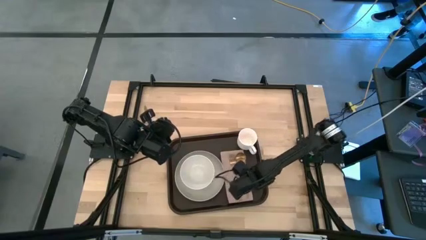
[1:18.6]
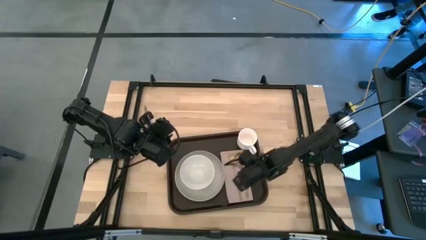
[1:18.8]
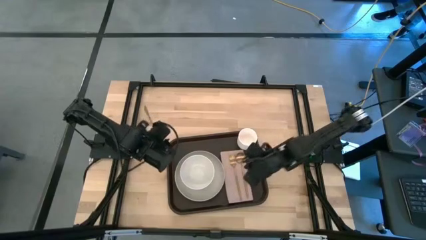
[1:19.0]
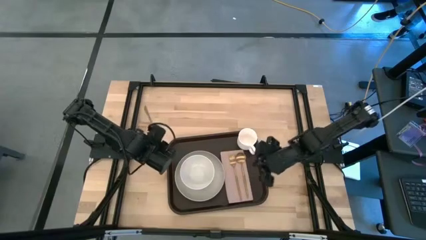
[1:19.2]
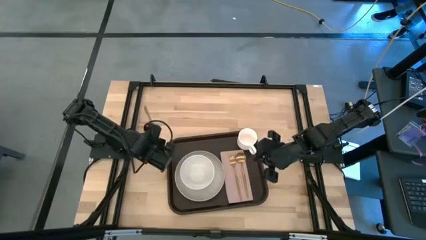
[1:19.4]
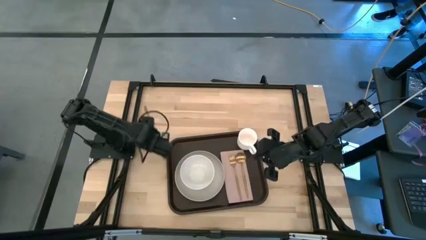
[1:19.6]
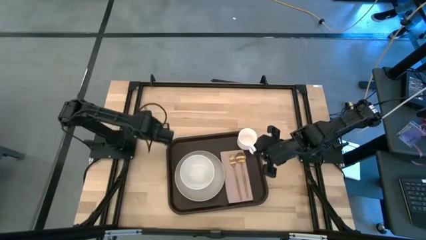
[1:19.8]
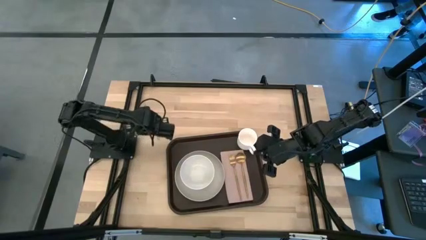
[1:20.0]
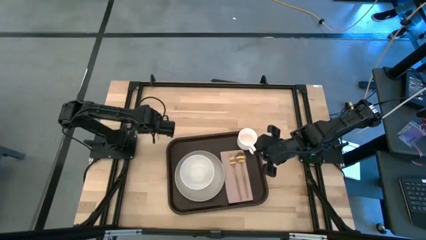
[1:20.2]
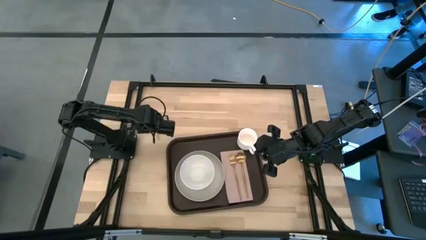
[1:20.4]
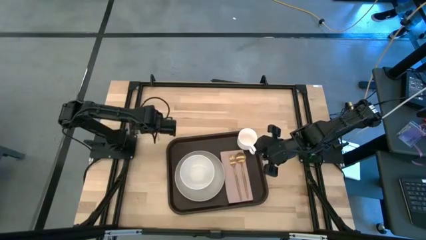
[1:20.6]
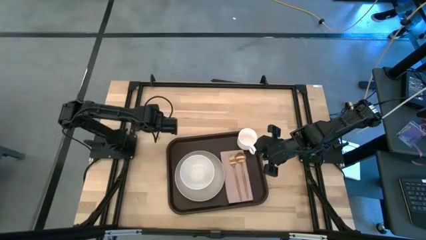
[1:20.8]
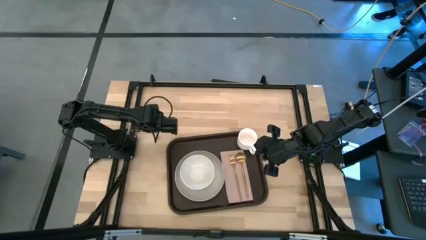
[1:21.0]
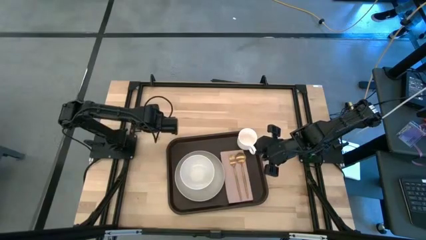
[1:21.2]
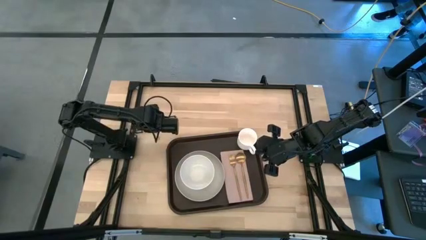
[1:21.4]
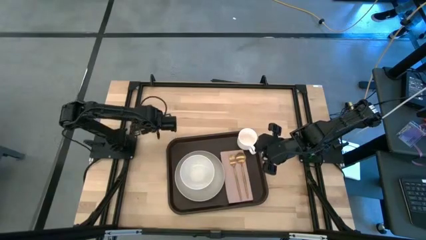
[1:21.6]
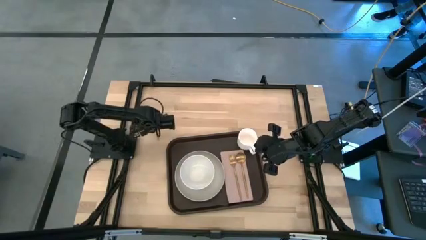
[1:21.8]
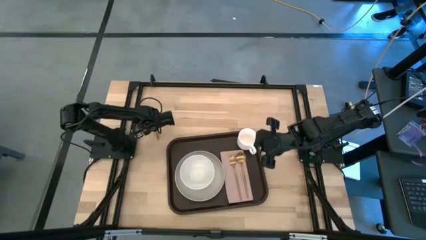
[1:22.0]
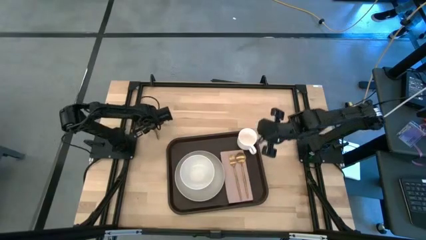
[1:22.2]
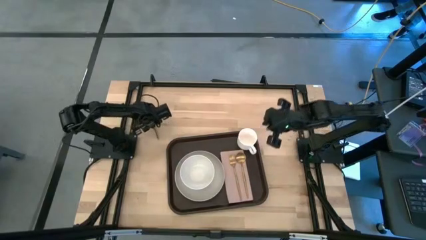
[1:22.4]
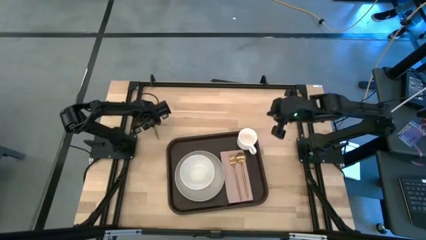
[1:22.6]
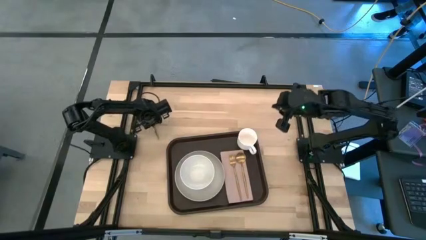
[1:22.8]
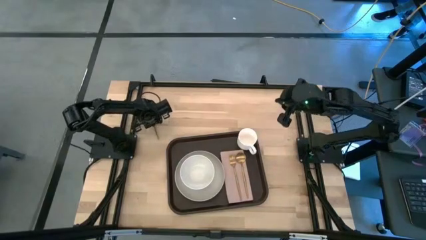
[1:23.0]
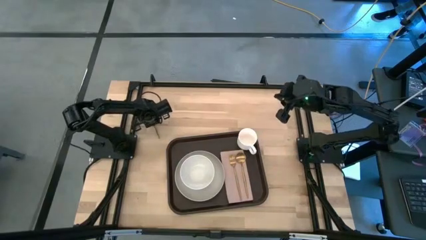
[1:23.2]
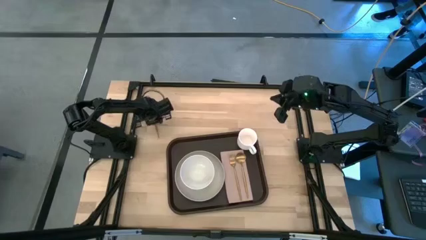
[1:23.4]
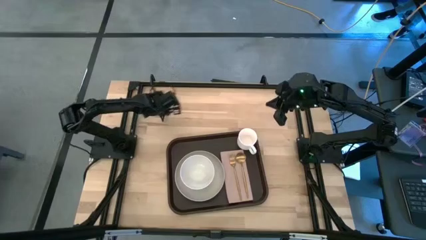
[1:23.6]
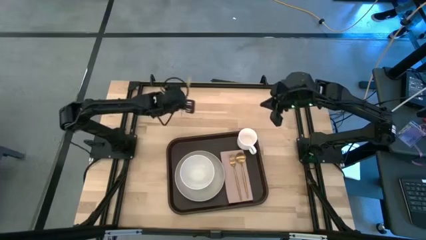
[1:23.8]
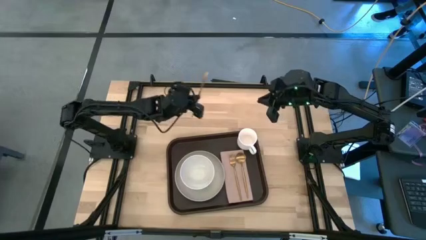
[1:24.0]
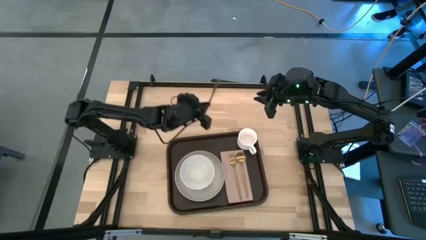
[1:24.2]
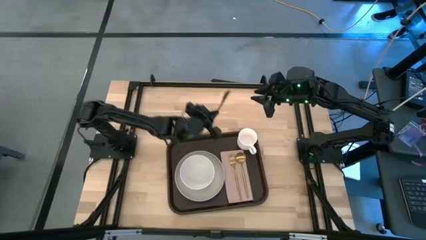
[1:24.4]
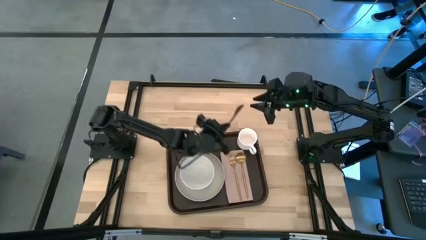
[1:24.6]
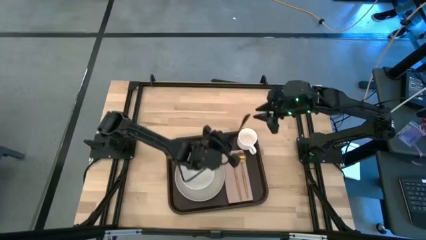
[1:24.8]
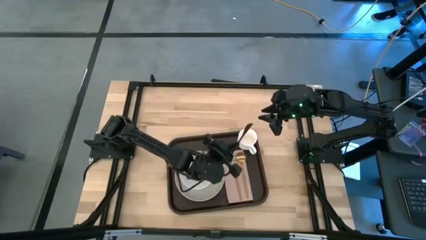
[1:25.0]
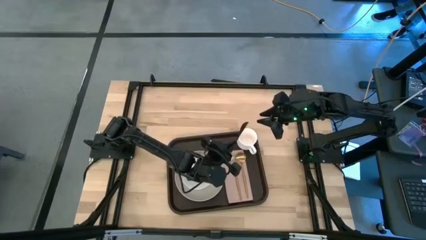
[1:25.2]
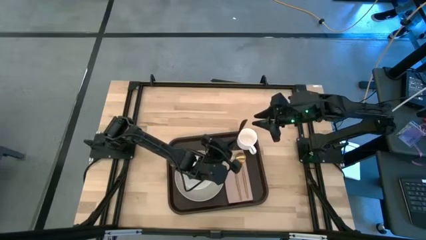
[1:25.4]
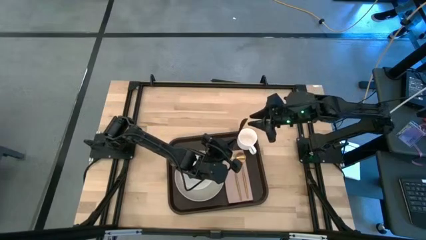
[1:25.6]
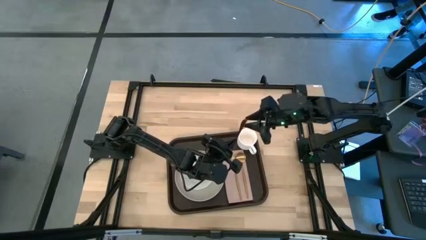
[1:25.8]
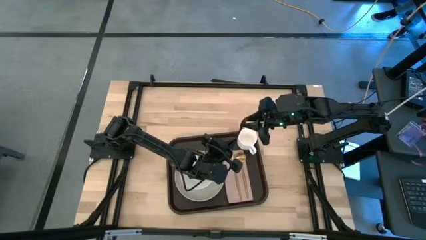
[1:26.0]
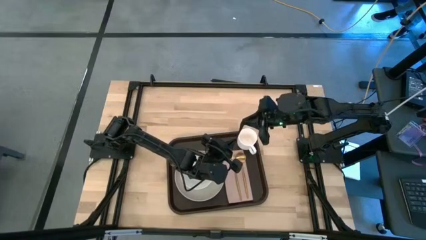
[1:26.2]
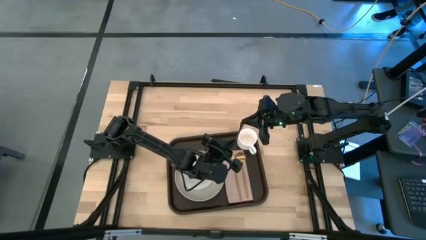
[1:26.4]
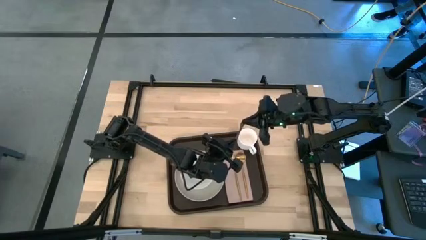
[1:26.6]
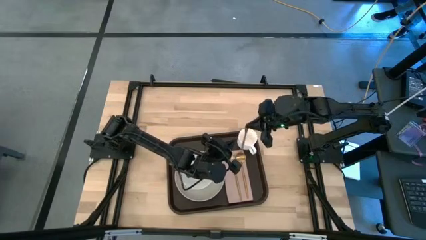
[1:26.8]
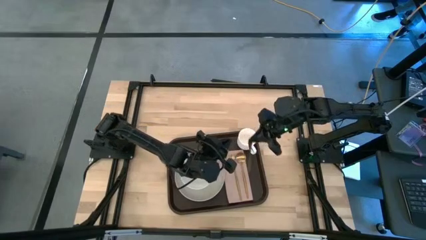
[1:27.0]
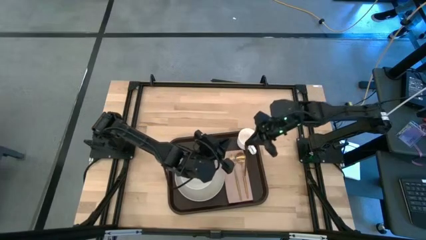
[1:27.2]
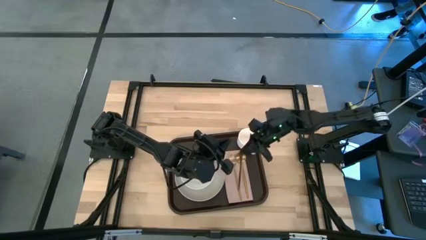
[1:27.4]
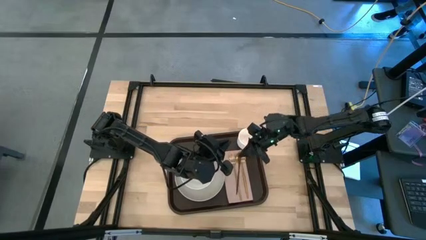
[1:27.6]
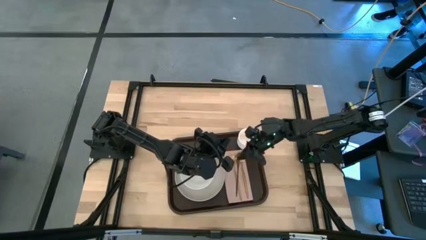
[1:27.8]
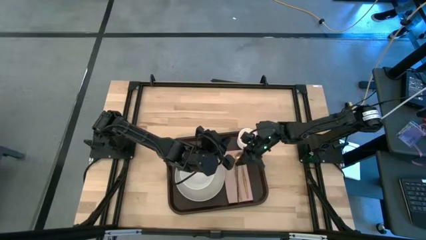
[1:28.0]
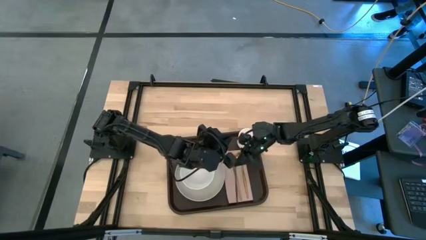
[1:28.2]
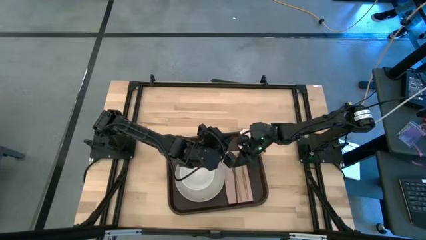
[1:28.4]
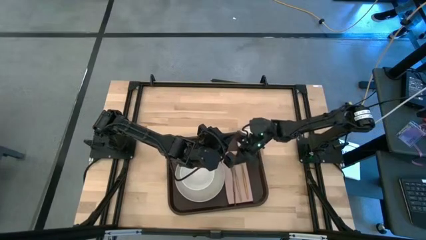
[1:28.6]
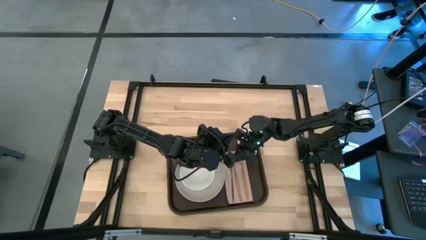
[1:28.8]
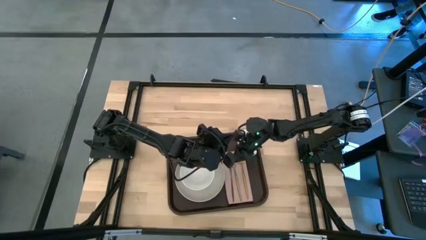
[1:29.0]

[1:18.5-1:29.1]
Task: Set up tray
Put the golden knife to the left of the golden fork on the brown serving tray

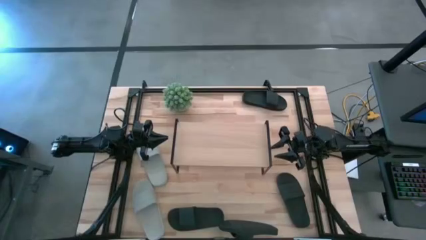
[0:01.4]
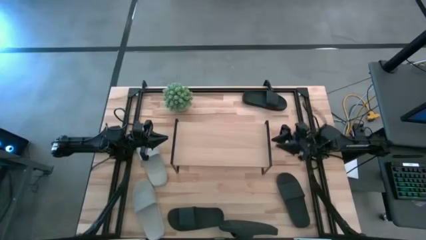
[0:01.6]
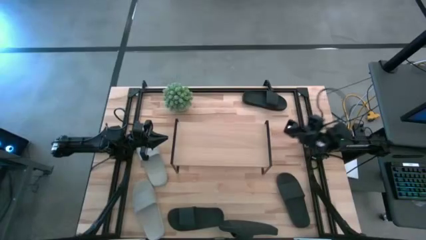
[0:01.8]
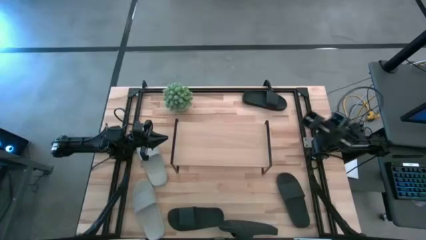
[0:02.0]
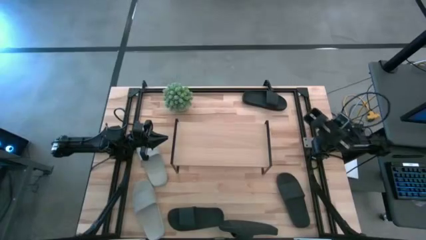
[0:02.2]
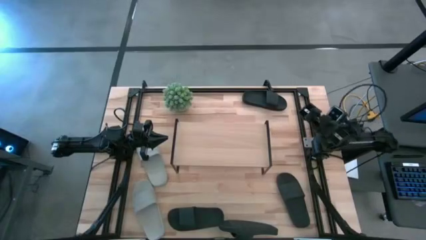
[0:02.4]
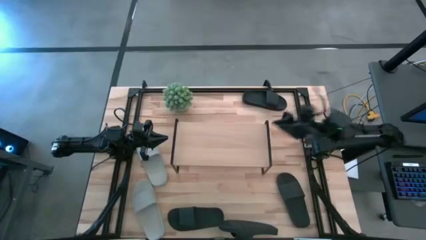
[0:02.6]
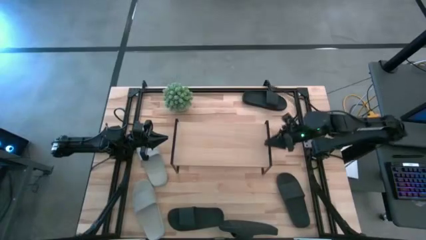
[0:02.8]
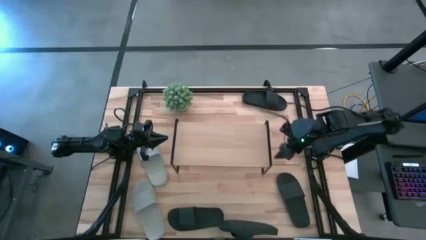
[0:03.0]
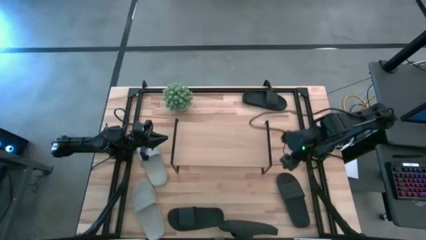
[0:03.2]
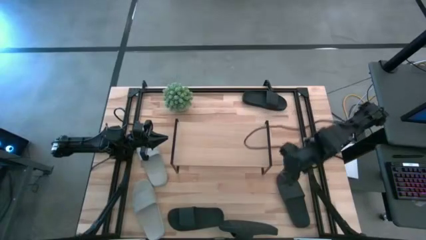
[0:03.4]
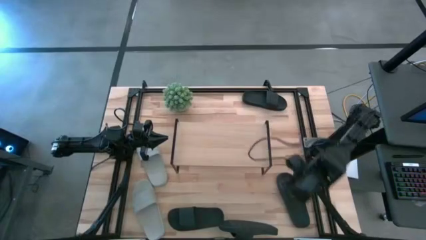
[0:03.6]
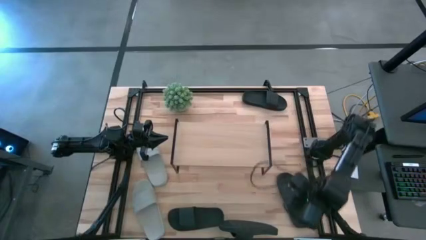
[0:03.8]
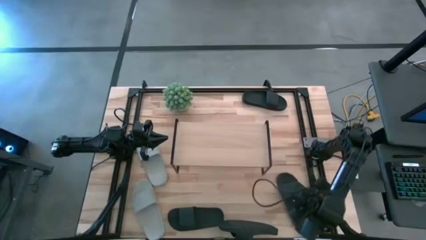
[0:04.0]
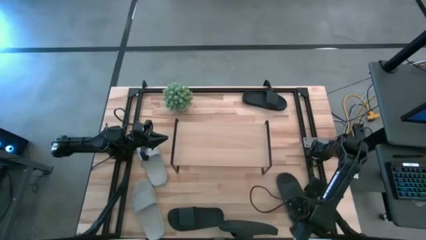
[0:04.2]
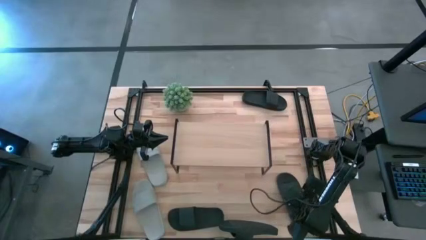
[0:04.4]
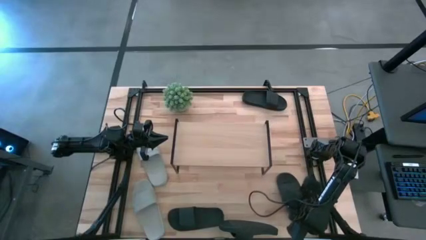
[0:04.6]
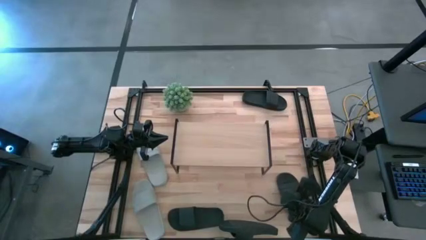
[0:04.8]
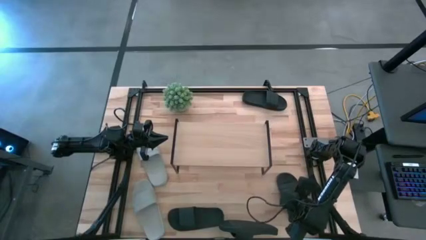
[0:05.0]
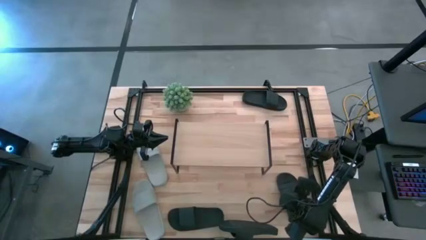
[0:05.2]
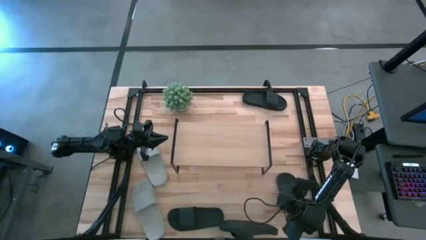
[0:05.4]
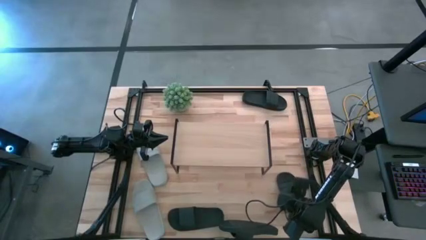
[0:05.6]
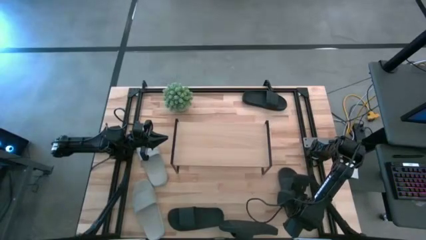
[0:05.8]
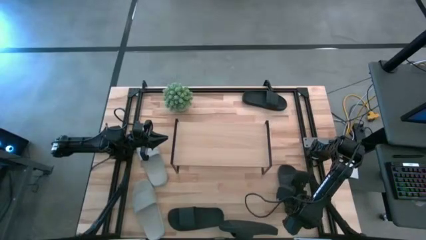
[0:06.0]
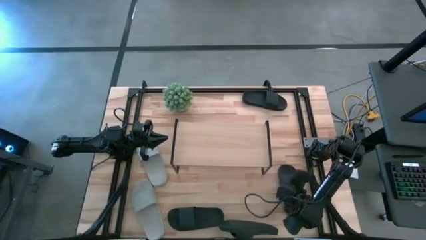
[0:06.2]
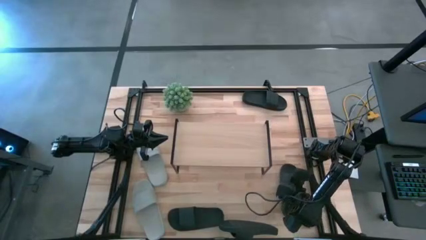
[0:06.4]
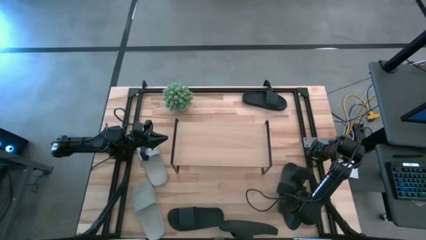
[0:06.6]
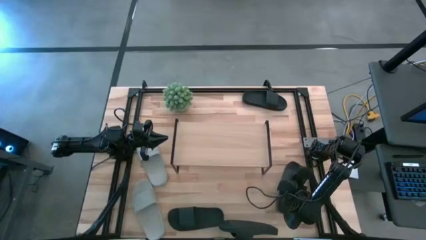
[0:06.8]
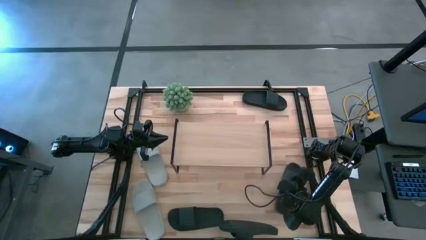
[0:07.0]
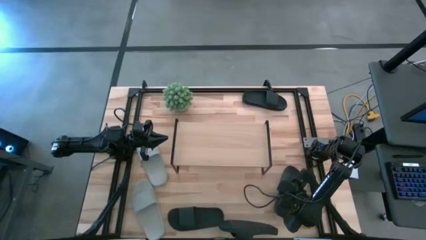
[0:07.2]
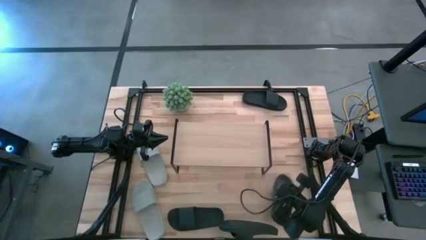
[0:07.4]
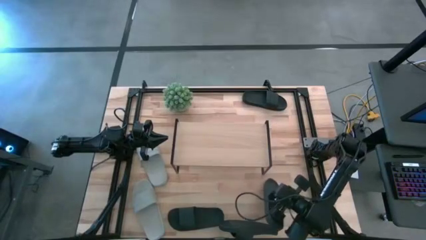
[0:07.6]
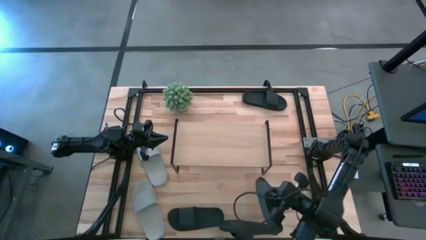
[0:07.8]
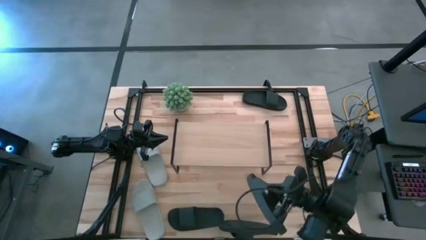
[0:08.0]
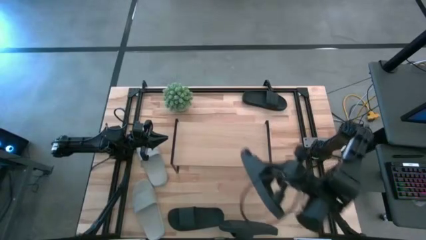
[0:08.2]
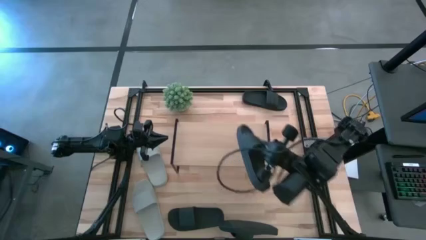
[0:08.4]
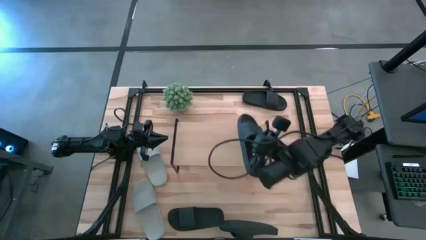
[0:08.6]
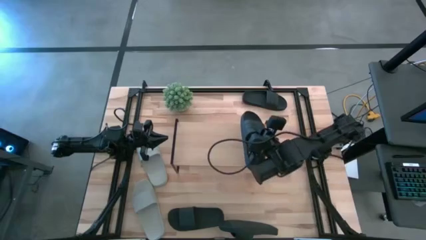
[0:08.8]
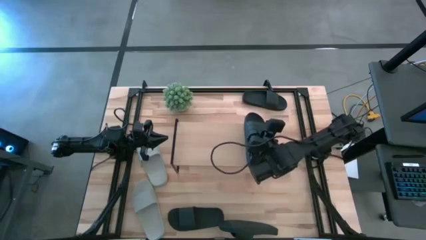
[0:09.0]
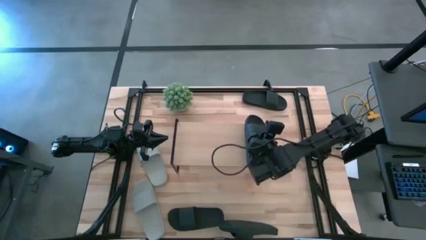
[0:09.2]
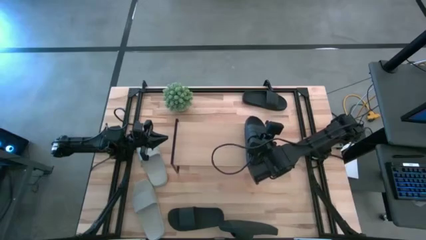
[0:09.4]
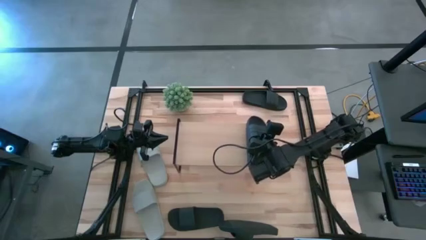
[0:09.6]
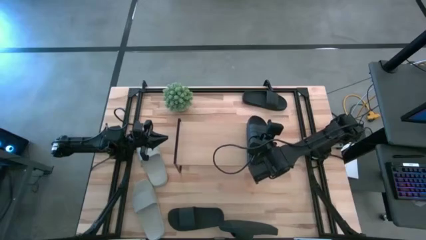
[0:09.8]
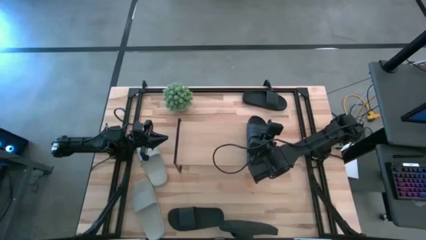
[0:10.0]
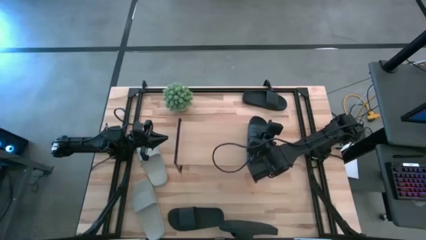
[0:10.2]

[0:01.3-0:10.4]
Task: Pick and place slides into the shelf
Put the black slipper on the shelf
